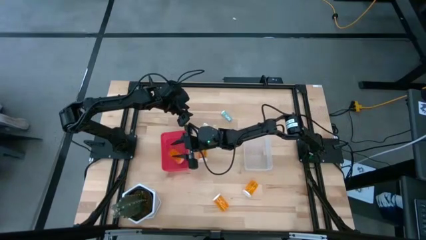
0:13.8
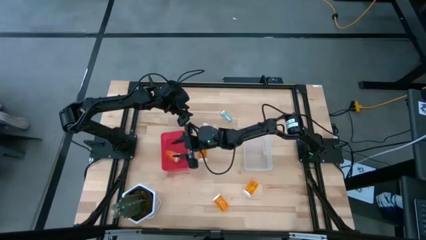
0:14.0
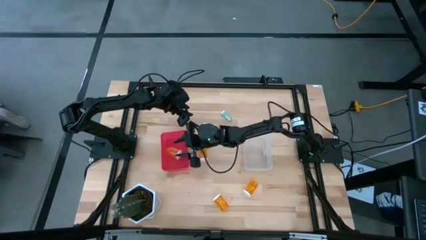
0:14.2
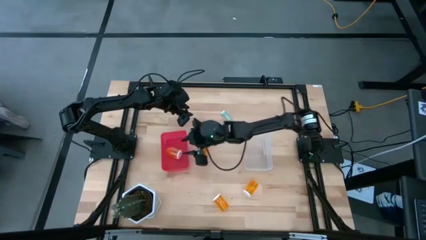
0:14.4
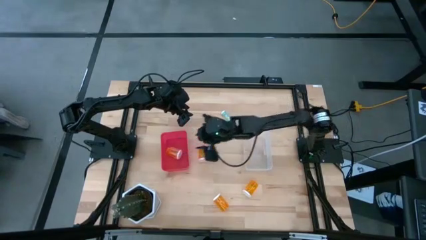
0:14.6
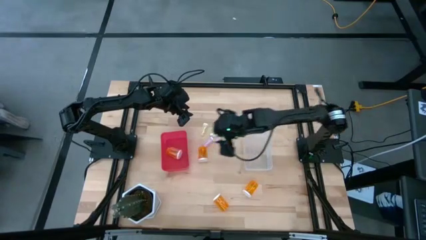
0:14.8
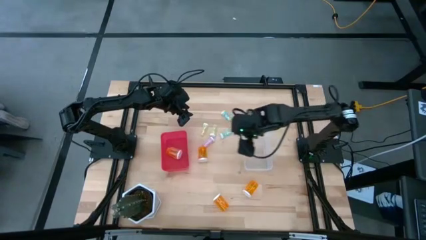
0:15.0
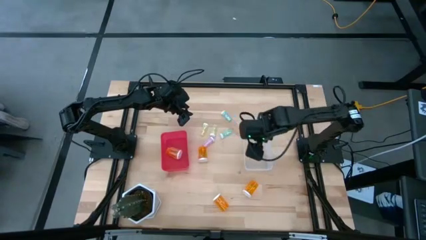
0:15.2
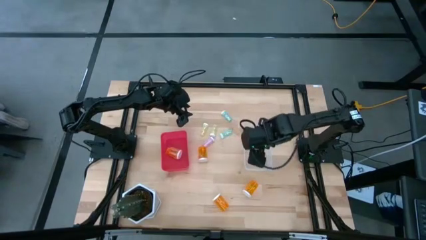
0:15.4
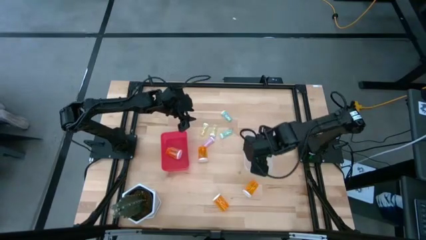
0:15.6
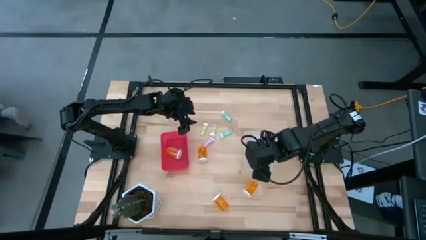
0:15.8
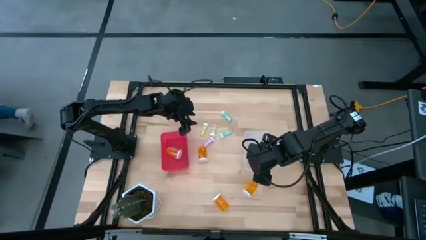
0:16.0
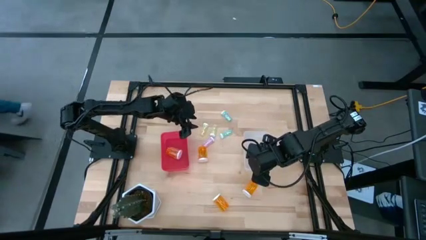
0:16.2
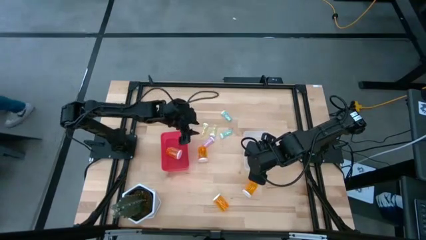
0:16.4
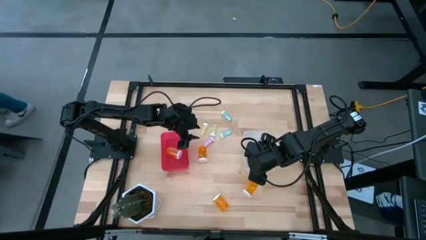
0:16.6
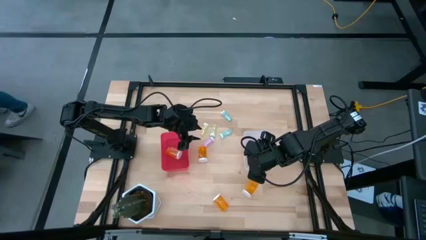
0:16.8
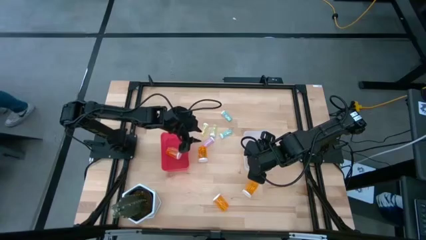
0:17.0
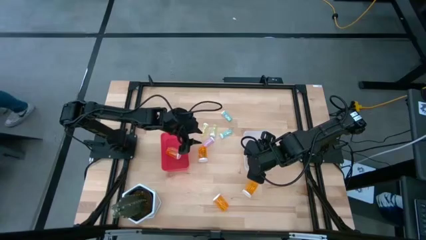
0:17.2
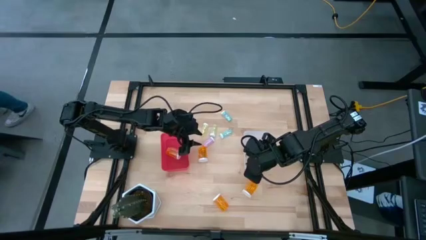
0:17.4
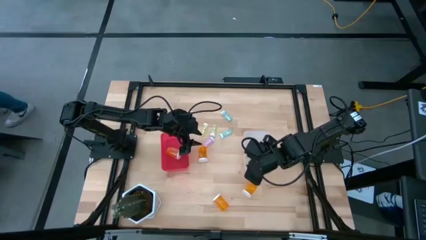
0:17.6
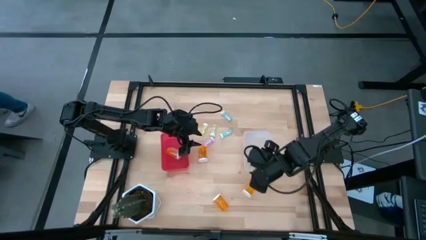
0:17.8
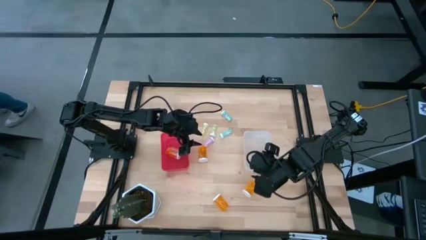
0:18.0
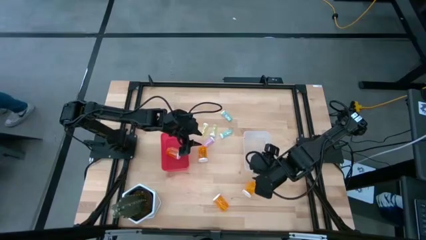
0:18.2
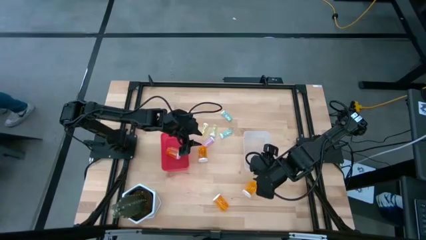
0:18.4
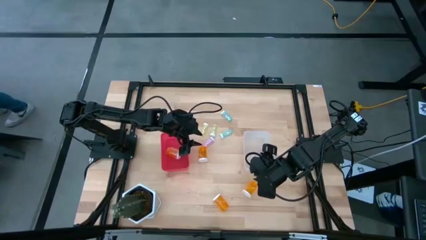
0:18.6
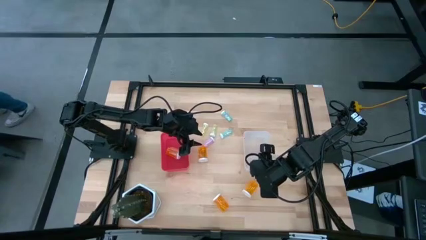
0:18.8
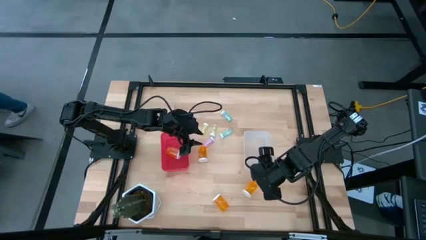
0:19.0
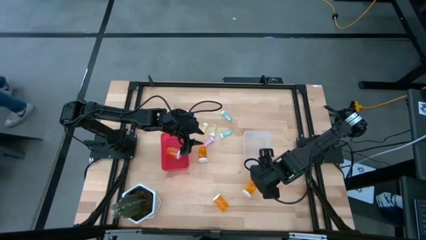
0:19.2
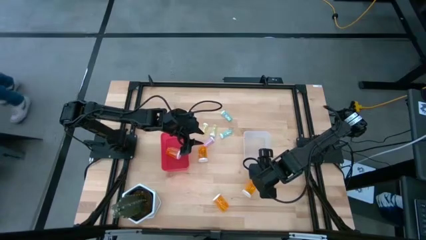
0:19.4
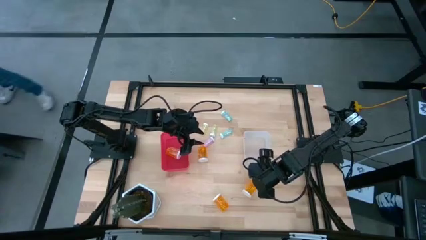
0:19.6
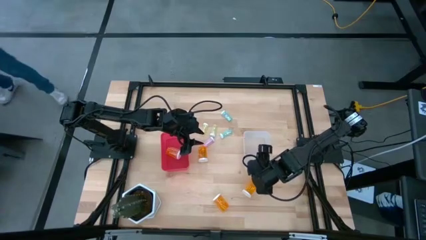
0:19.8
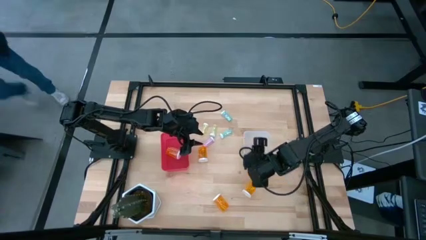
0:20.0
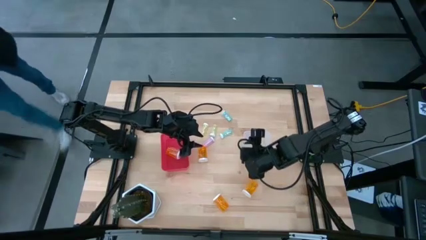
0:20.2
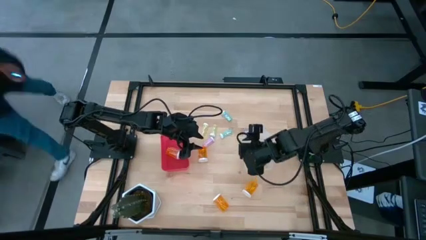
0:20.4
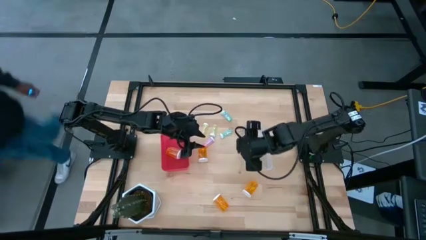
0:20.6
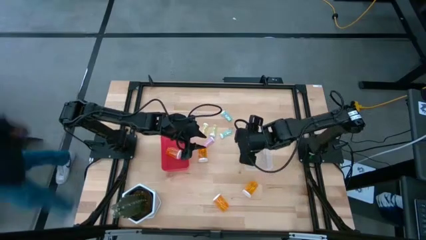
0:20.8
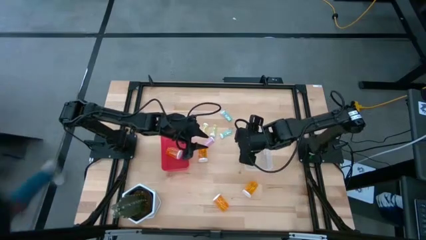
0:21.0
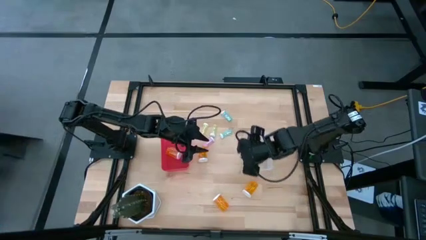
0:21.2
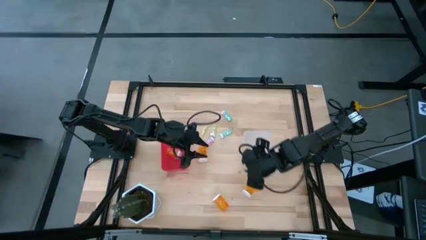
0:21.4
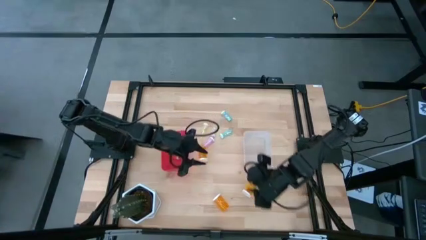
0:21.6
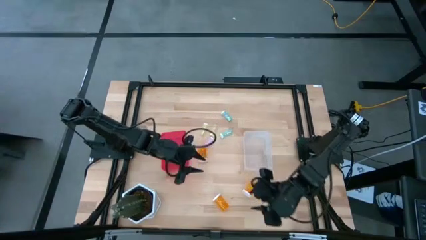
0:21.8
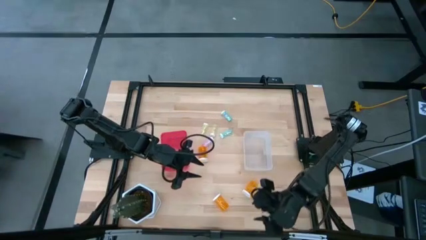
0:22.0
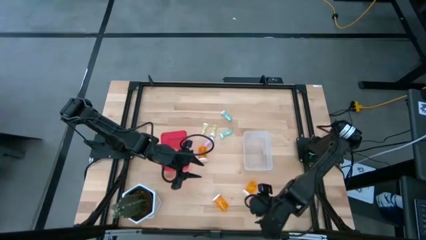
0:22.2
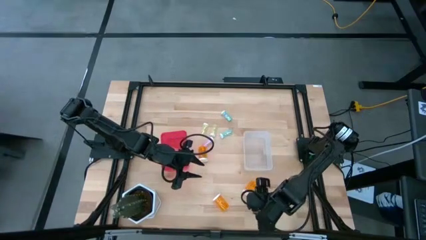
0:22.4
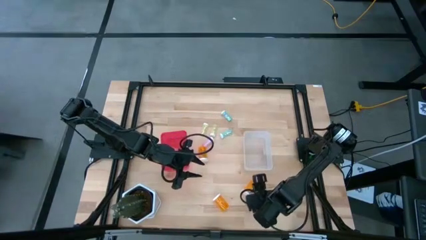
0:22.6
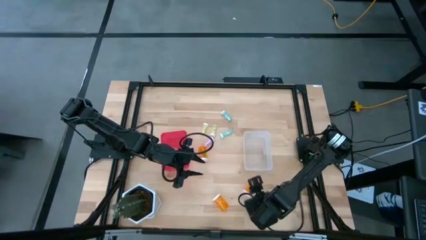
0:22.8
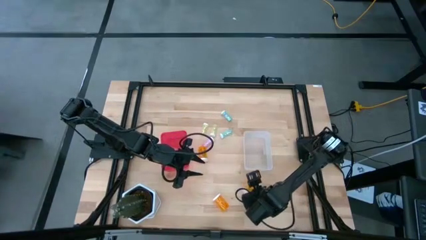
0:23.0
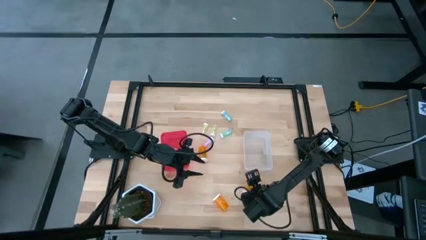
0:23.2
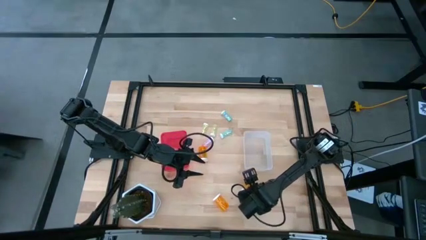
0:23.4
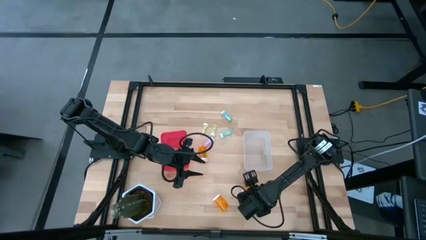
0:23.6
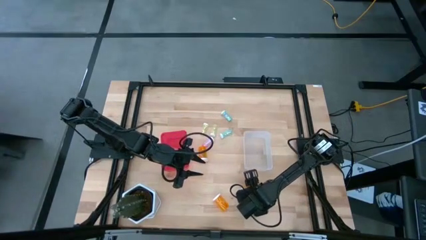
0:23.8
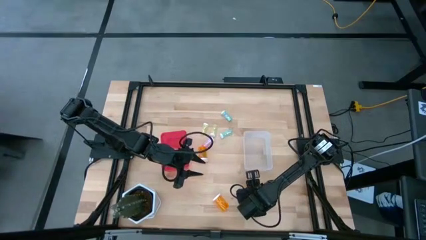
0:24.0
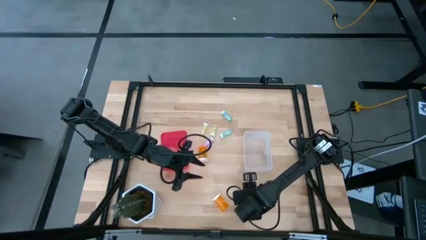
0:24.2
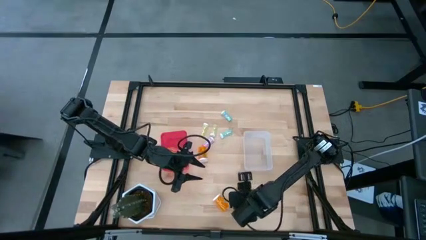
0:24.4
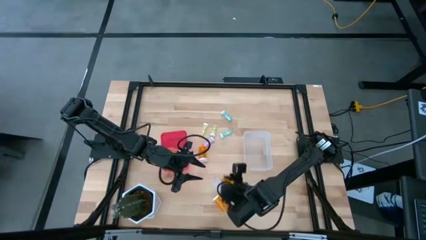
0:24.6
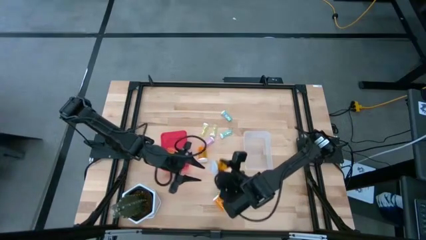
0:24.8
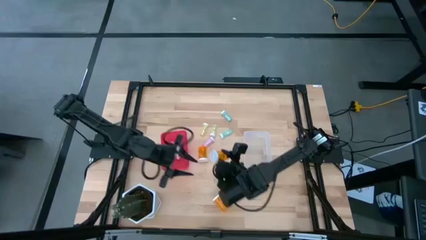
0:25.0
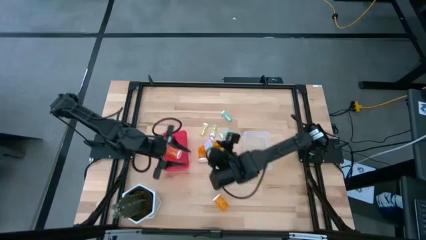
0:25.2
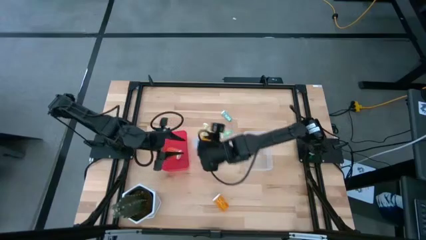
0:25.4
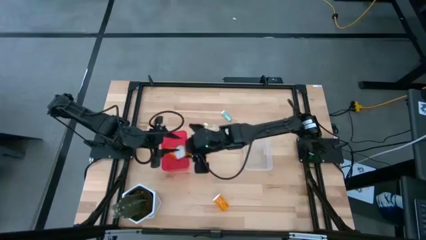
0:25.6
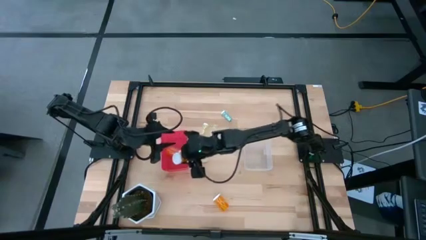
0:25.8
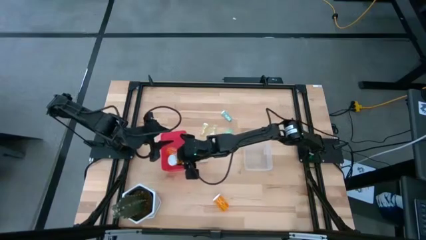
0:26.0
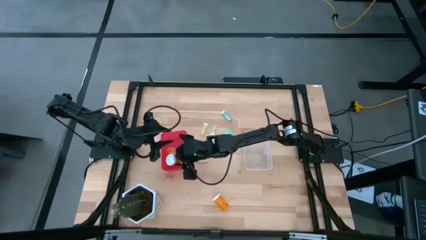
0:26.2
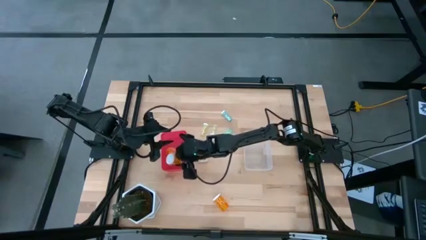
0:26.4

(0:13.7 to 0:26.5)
Task: Pick and place medicine bottles into bin by pill shape (circle, oval)
Put the big orange pill bottle into the red bin

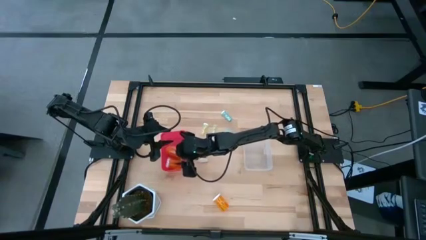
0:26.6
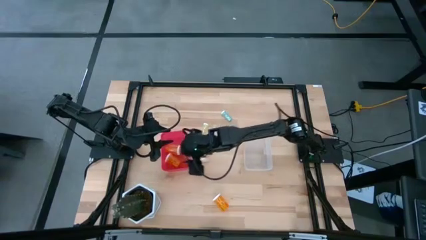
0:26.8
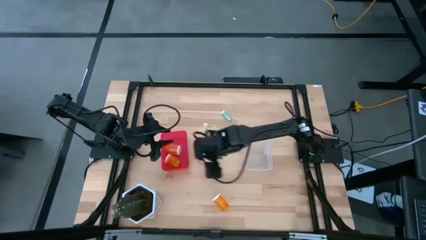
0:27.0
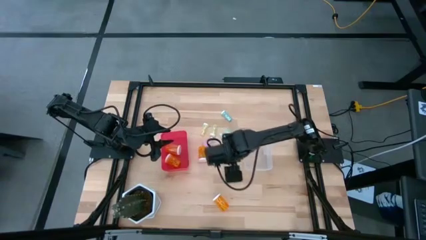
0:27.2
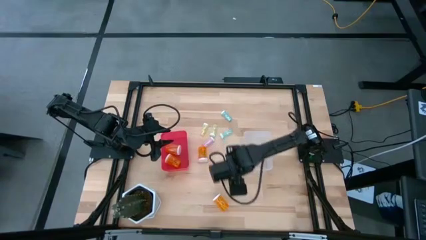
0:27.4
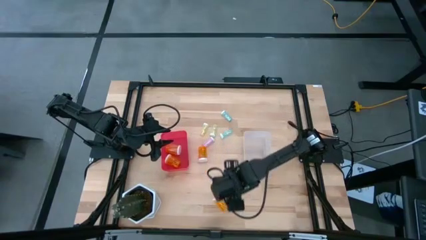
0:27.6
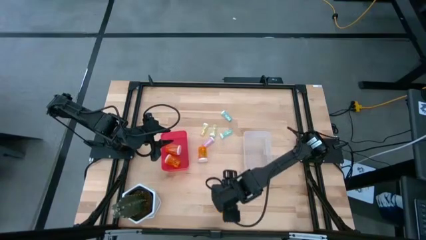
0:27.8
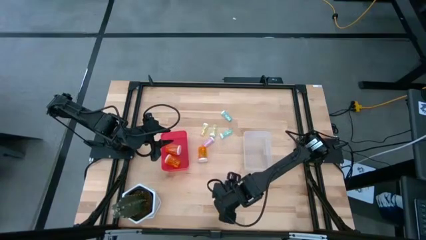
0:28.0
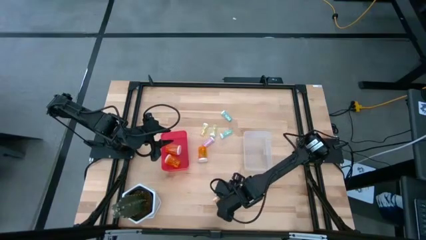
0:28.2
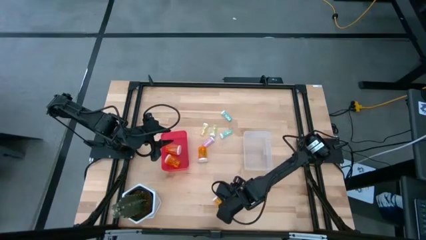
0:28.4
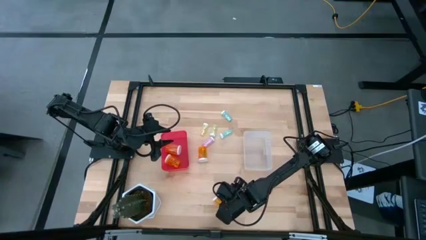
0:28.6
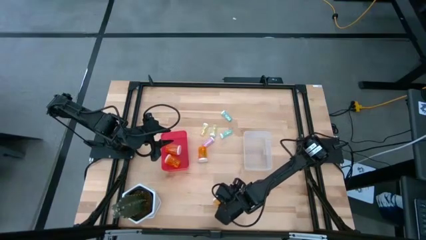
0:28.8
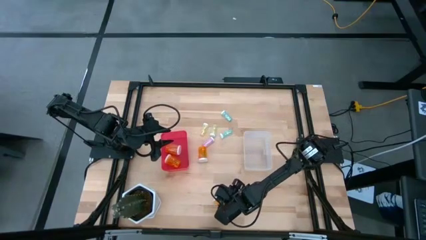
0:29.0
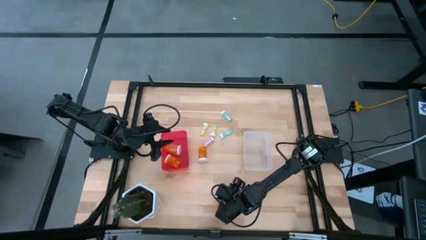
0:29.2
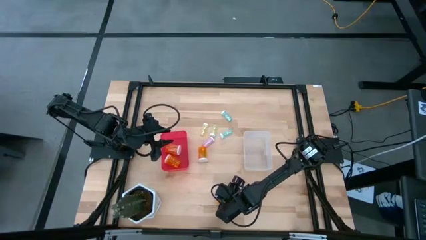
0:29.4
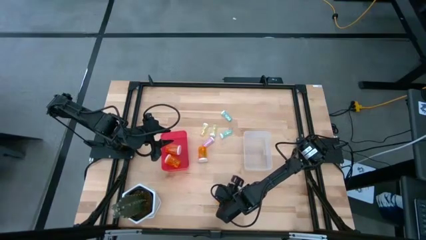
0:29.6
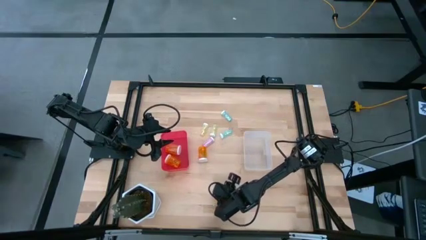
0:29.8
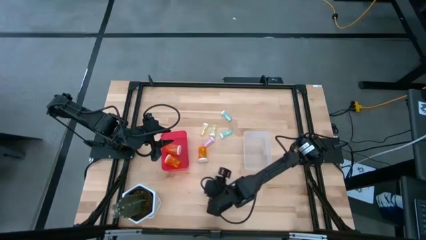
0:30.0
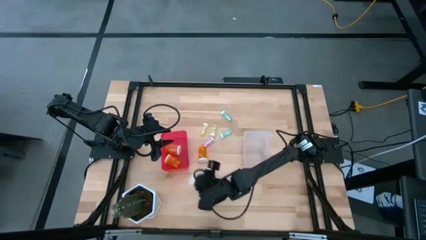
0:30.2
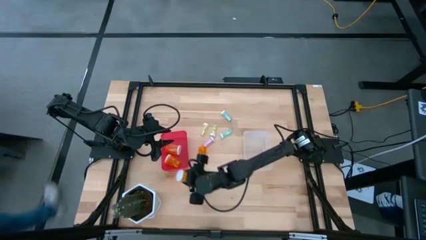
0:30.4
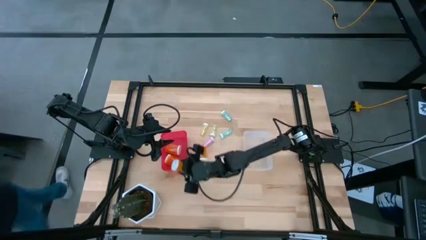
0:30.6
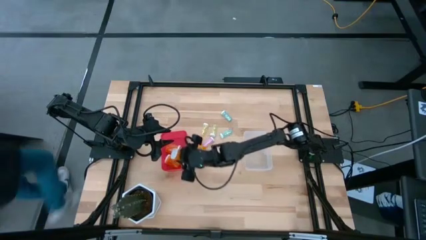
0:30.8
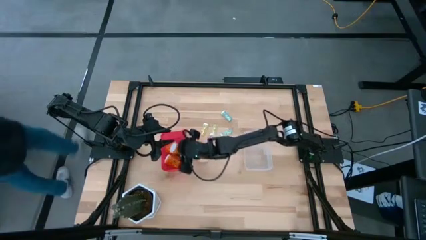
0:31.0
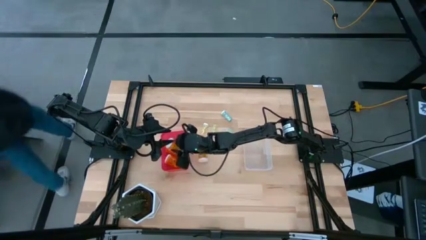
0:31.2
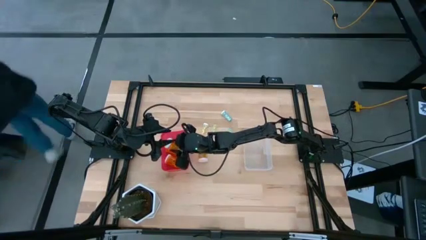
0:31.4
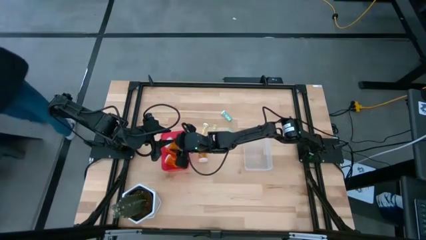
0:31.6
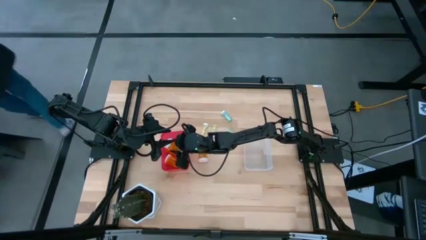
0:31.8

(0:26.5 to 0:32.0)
Put the big orange pill bottle into the red bin
